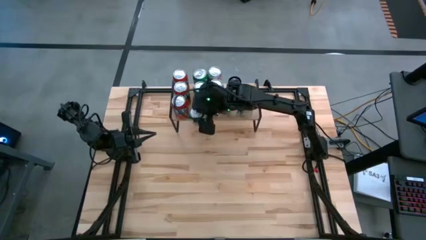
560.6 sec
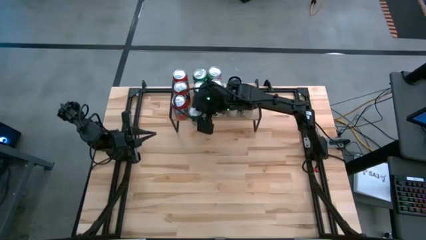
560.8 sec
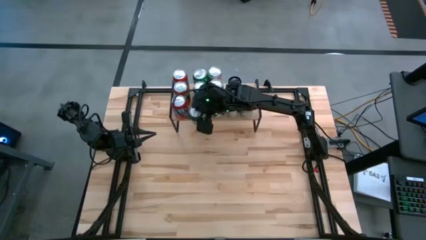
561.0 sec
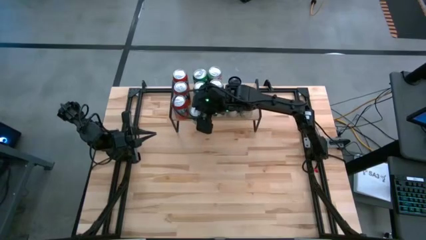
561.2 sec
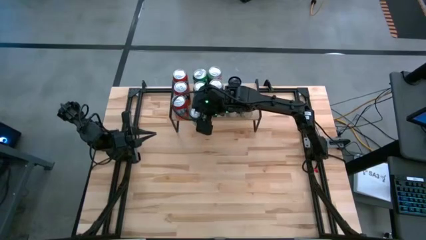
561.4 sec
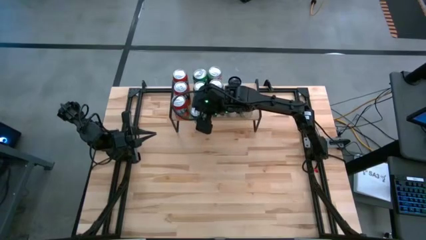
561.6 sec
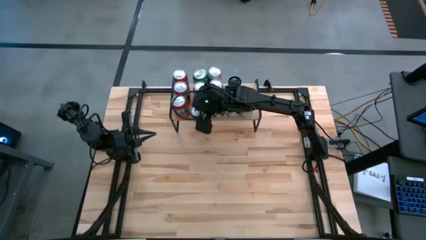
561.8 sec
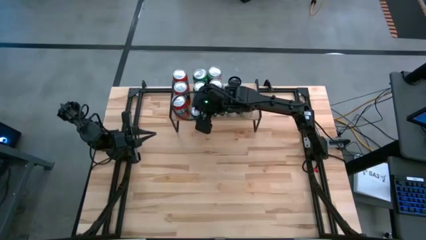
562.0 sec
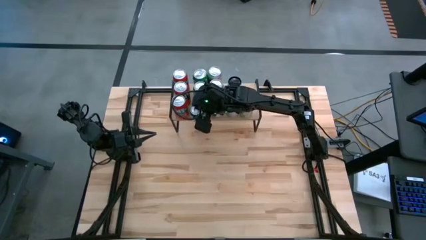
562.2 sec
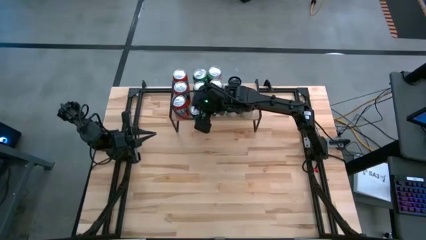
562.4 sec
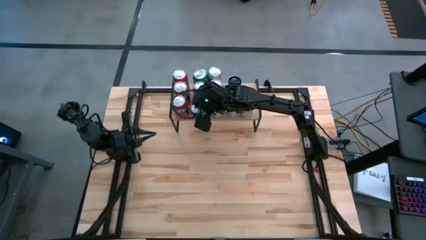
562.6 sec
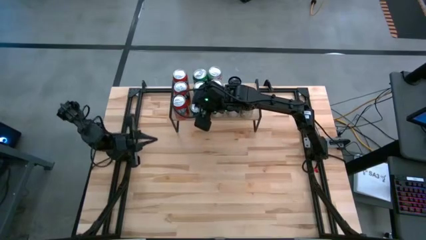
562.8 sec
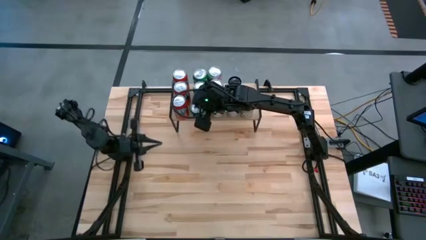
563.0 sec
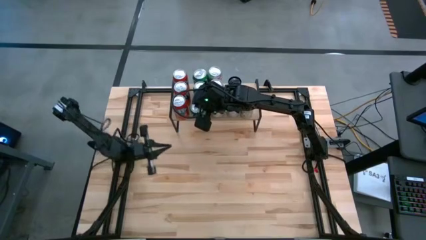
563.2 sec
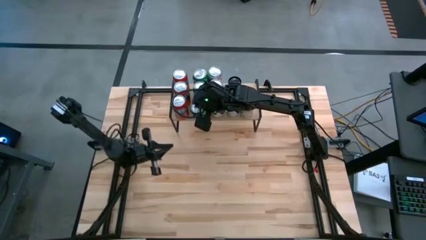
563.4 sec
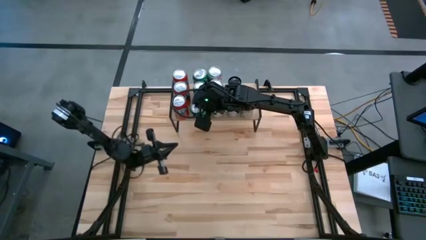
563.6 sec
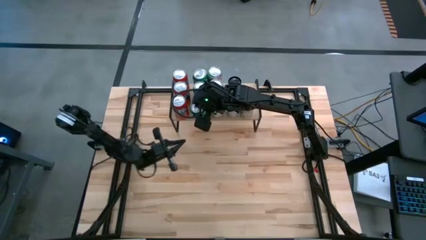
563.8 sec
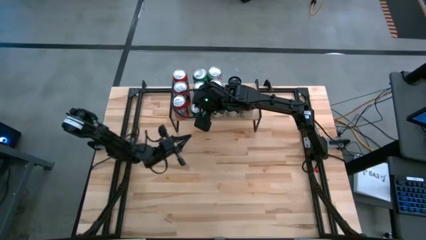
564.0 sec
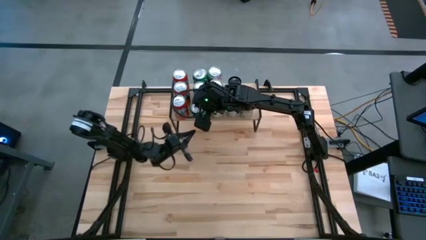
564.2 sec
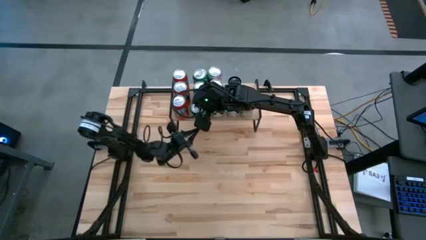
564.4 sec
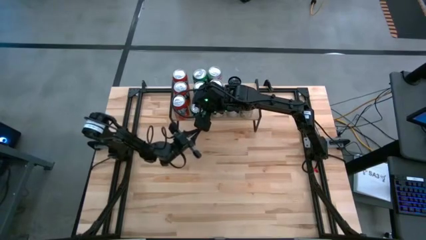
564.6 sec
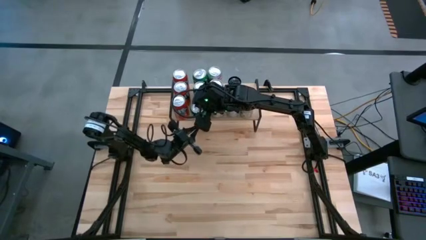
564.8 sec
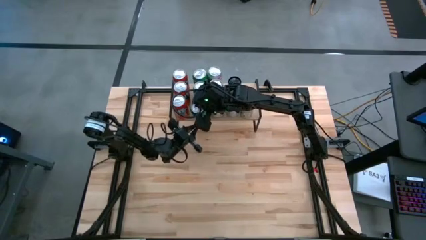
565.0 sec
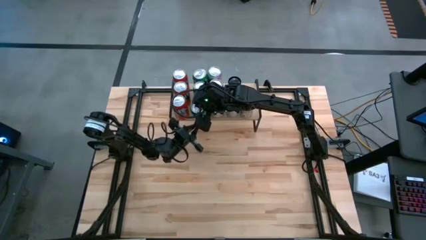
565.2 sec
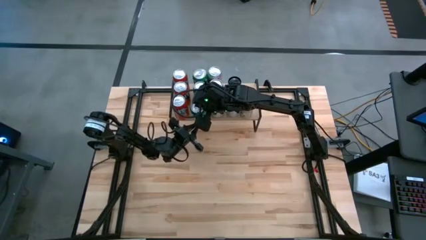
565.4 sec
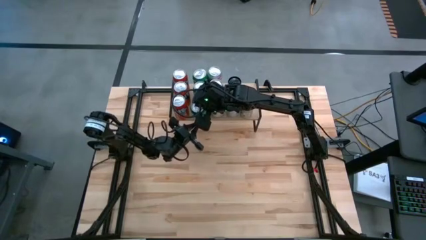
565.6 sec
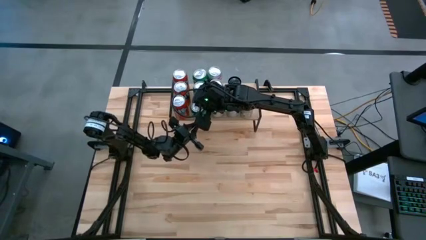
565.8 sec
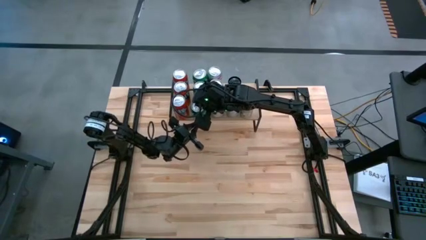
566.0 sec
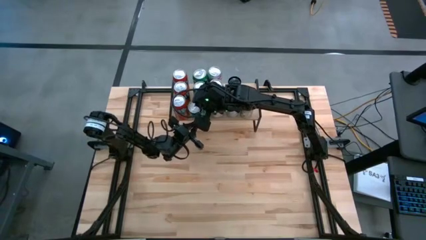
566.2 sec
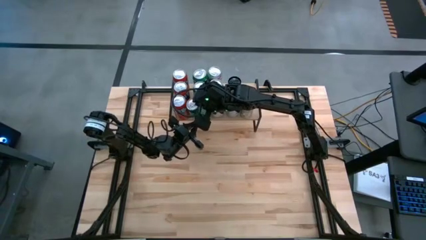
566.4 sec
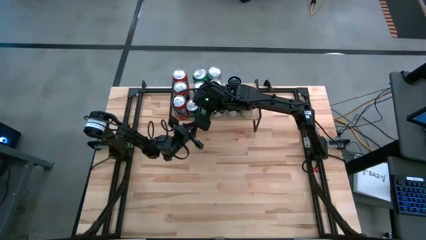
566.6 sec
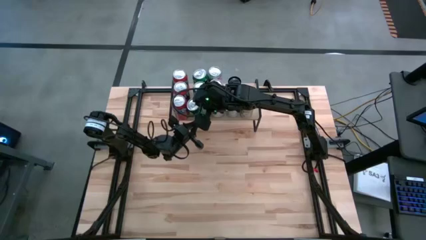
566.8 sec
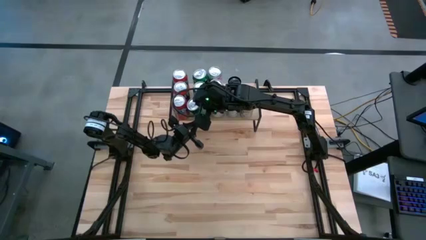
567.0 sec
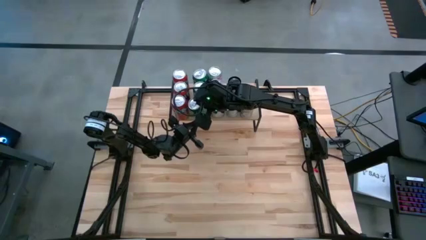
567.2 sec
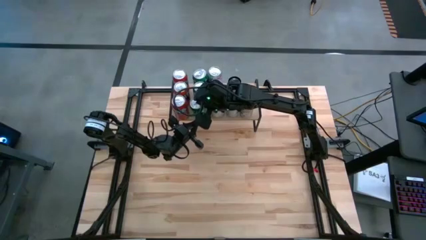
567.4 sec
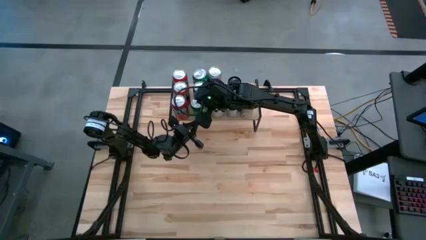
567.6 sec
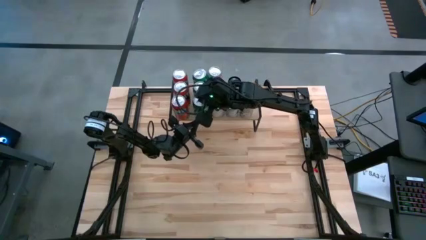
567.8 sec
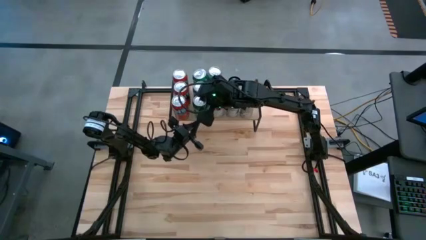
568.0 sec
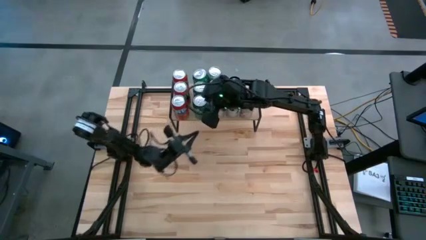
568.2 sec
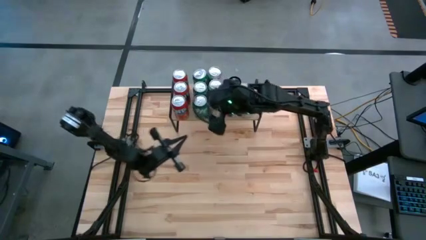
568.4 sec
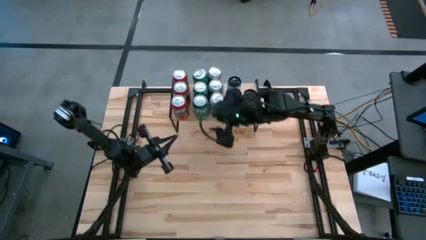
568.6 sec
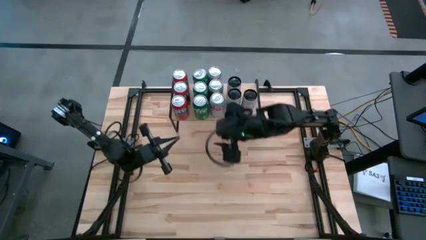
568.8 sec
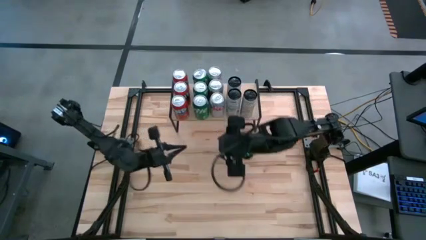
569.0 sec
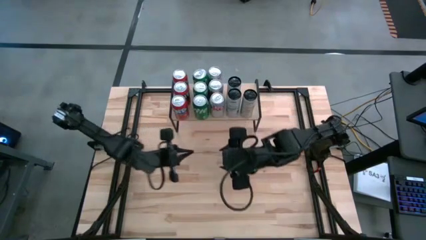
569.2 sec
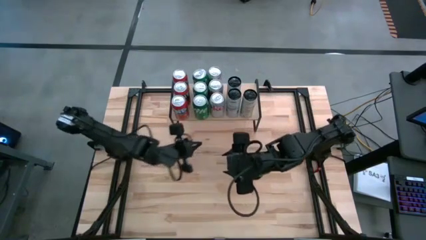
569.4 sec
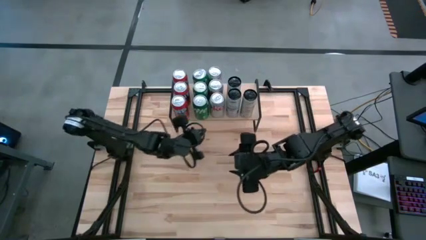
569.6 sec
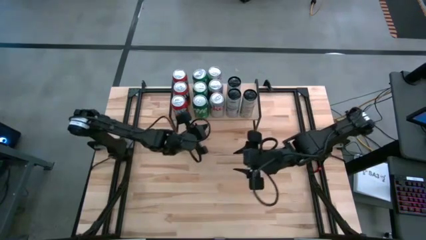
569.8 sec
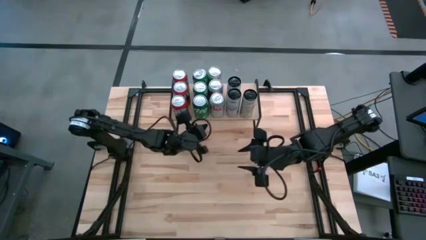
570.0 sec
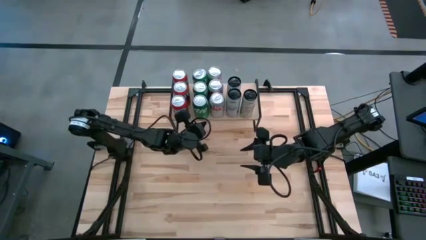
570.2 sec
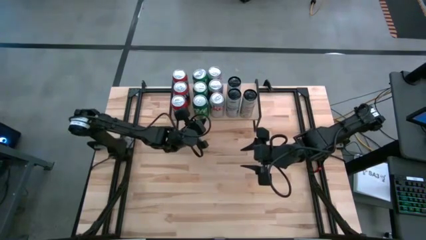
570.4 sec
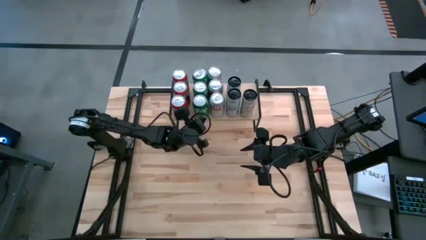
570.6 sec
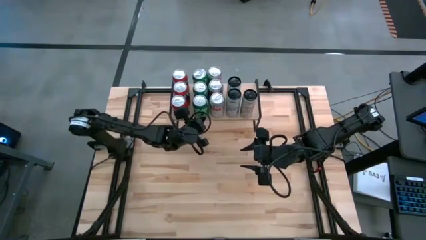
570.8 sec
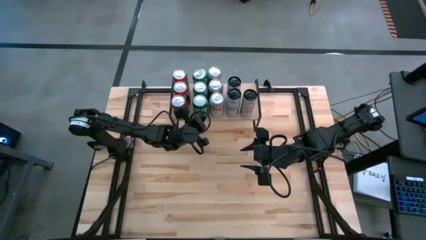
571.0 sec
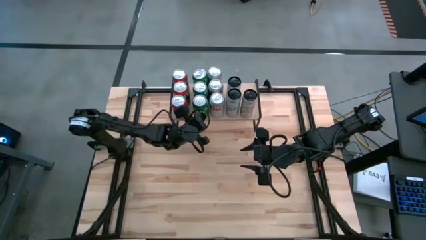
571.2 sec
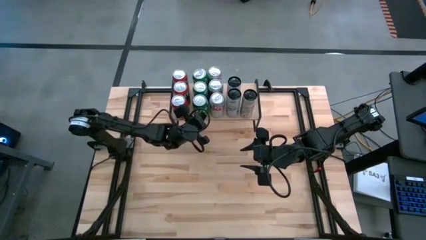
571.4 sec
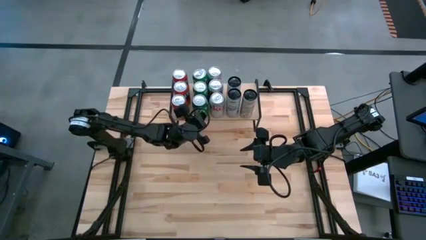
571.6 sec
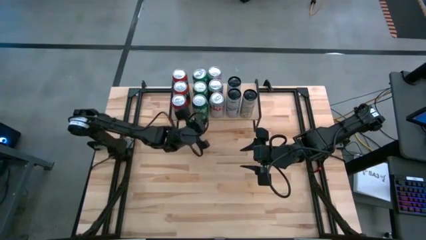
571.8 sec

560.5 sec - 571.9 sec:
Task: Place canned beverage on shelf
Put the green soda can on the shelf aligned with the other green soda can

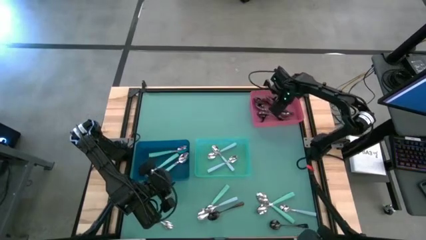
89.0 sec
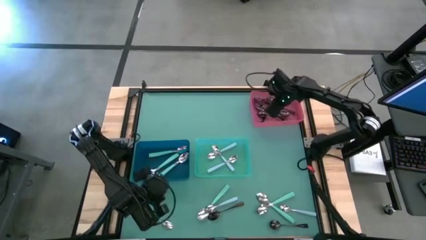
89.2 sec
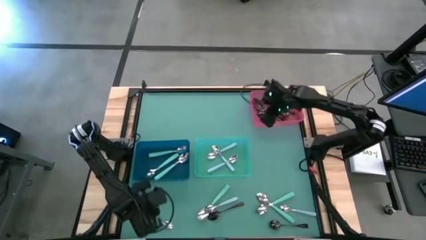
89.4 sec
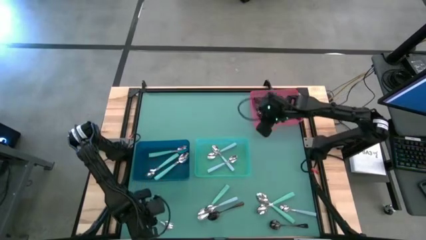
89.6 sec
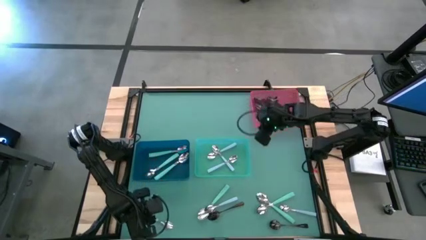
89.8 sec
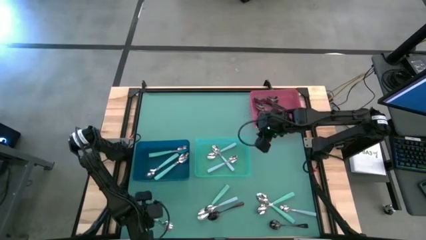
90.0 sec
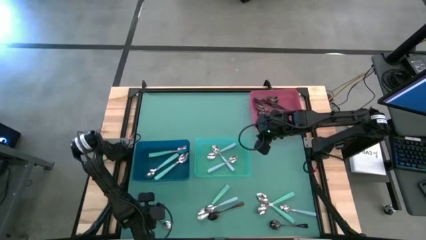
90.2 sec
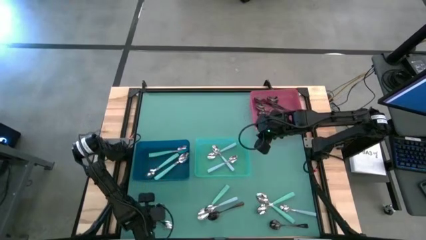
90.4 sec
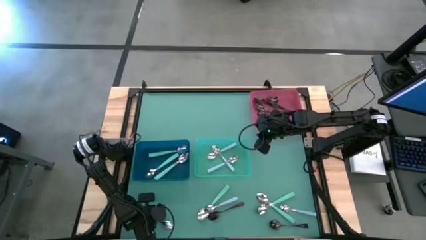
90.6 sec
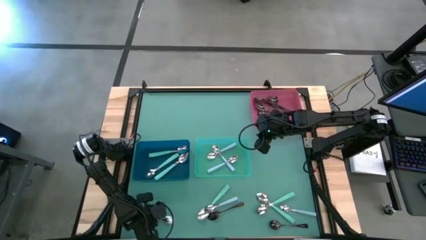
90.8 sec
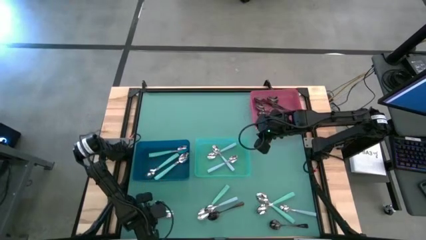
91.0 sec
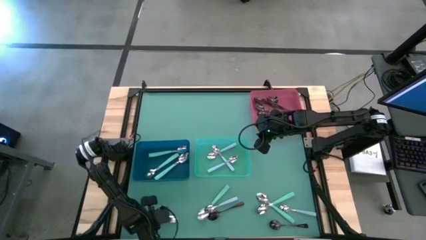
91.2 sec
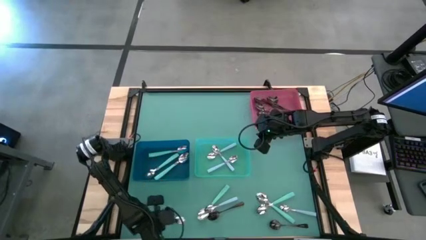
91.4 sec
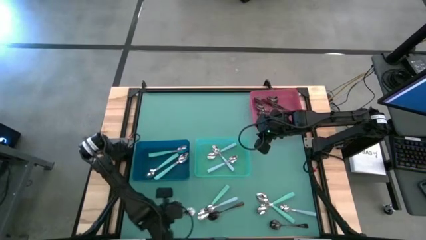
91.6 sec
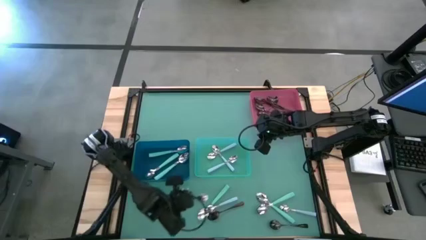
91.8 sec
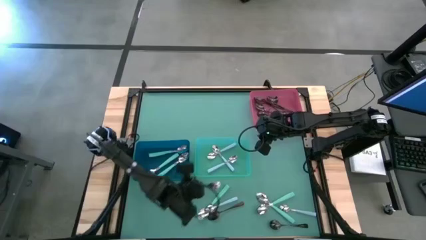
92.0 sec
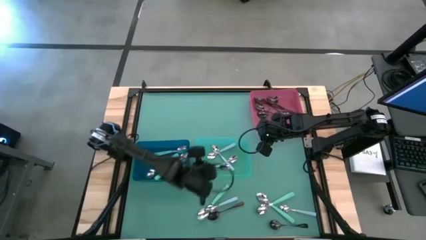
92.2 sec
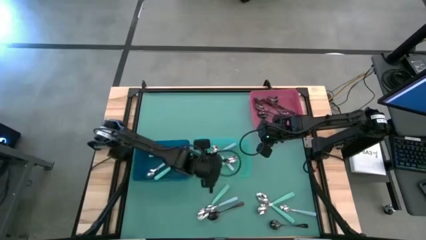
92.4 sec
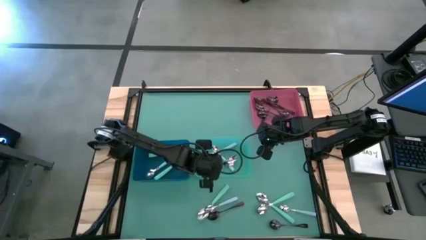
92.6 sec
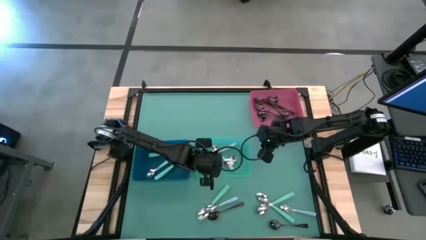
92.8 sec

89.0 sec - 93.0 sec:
Task: Sort silverware by color (type)
Put the blue spoon into the green bin
